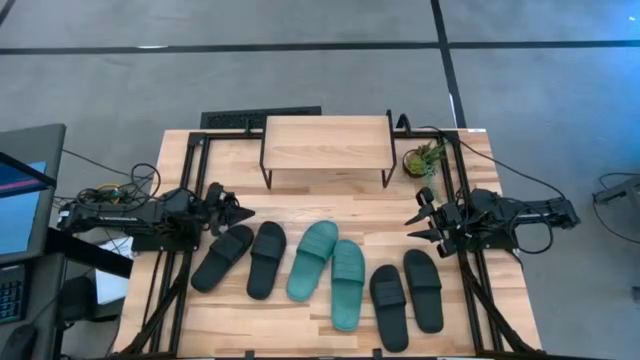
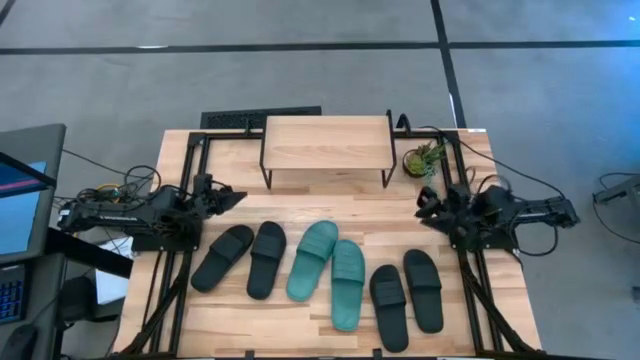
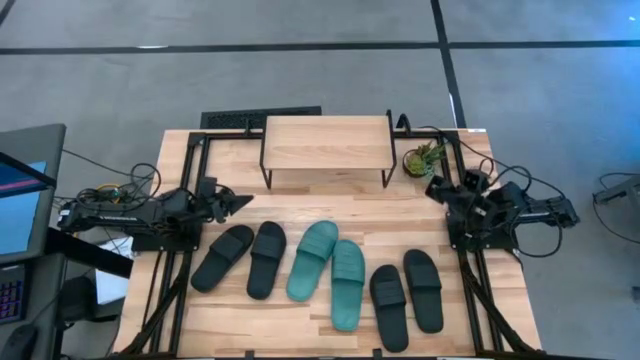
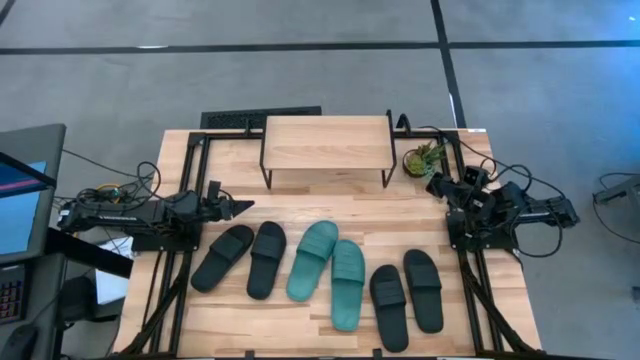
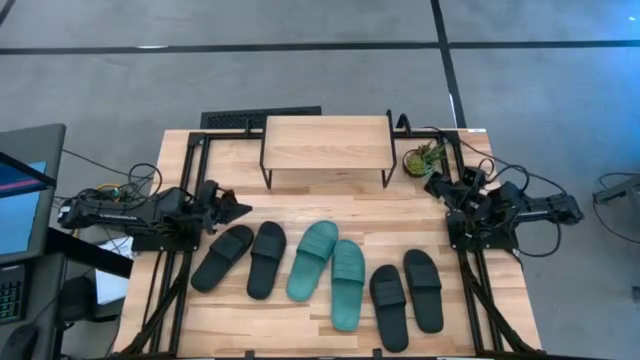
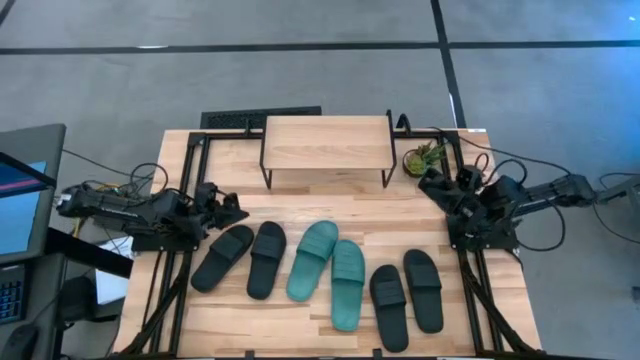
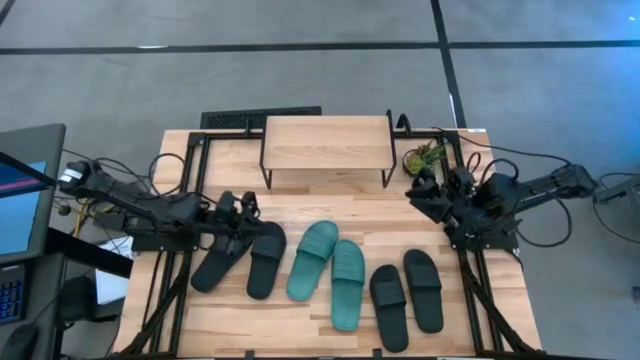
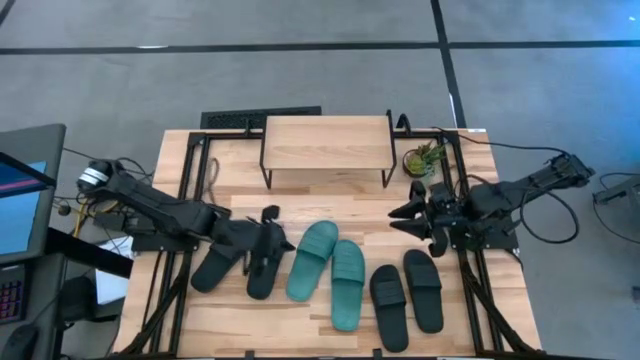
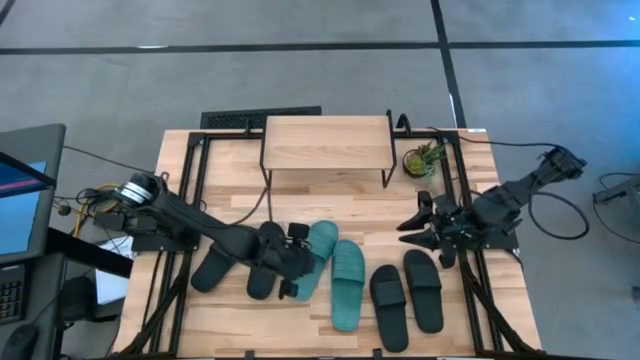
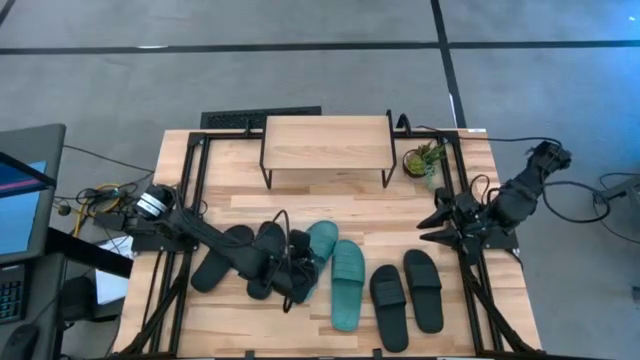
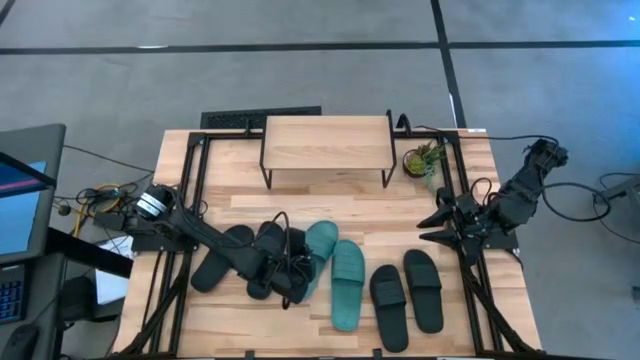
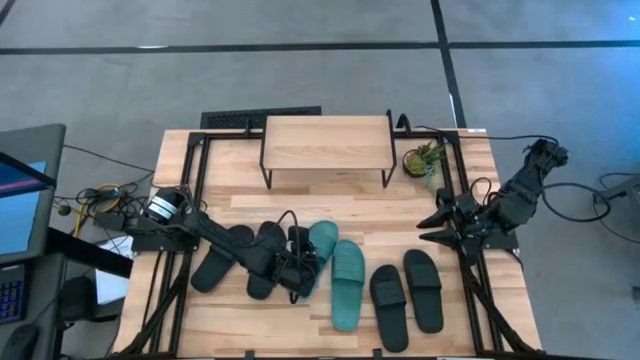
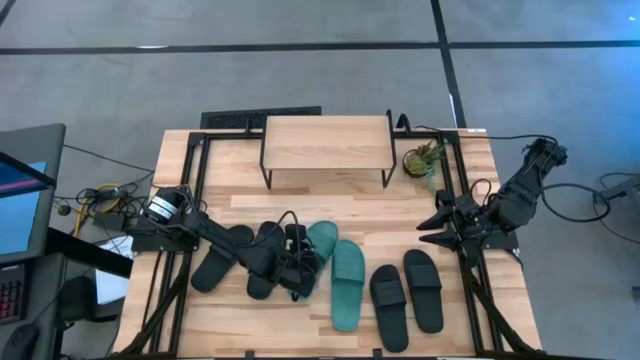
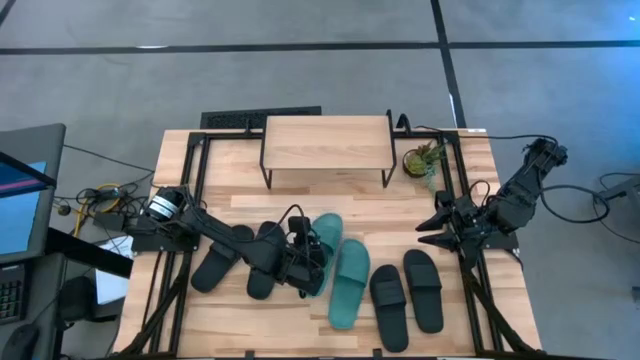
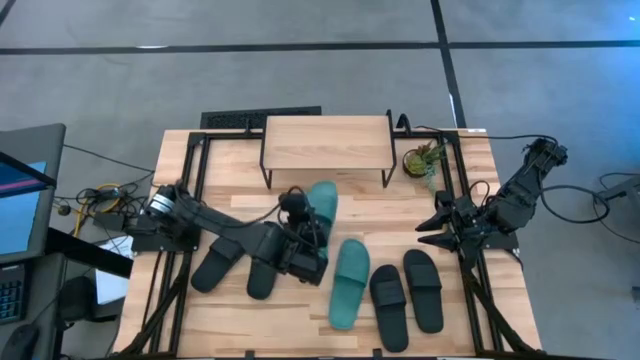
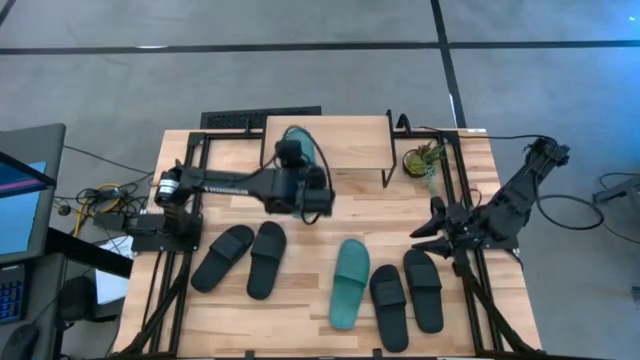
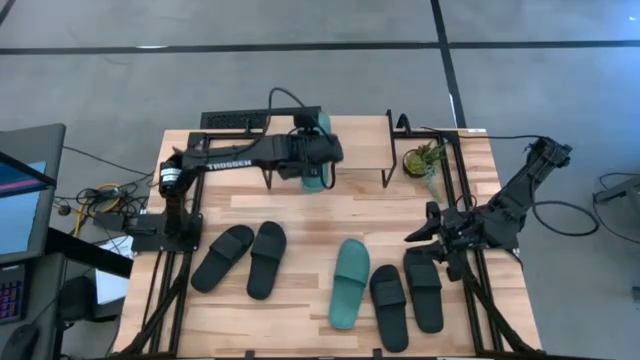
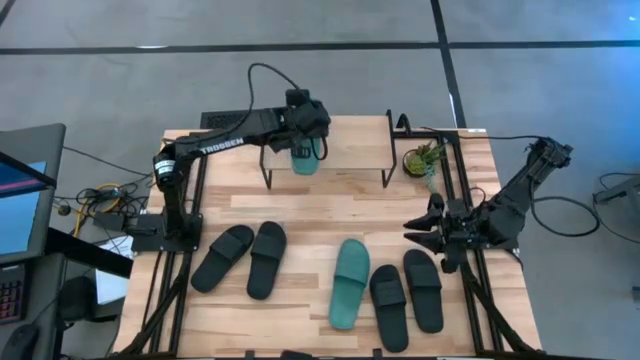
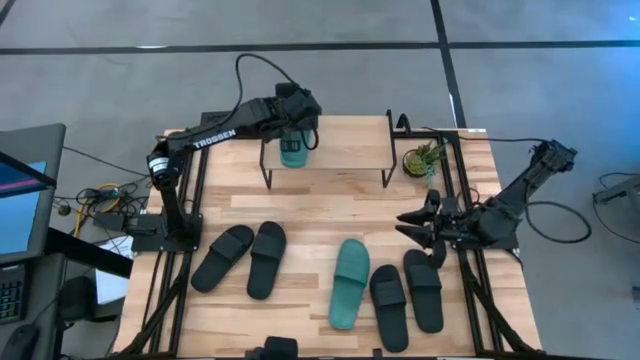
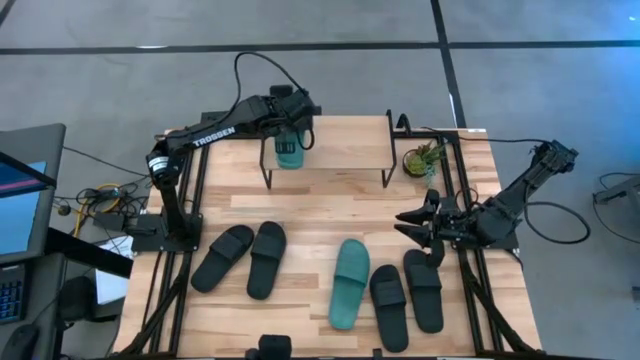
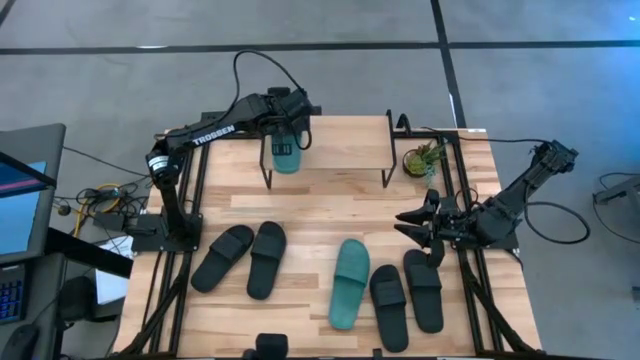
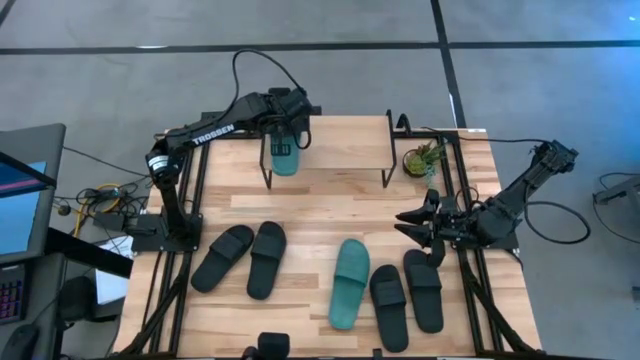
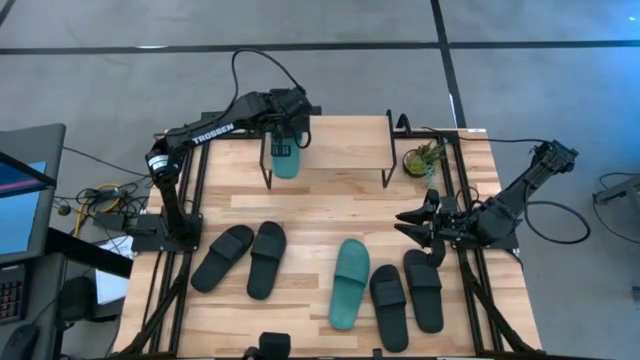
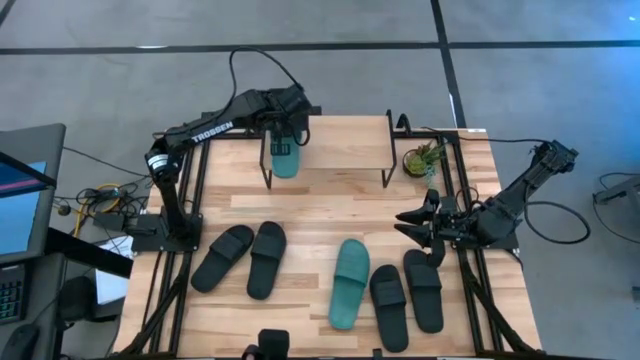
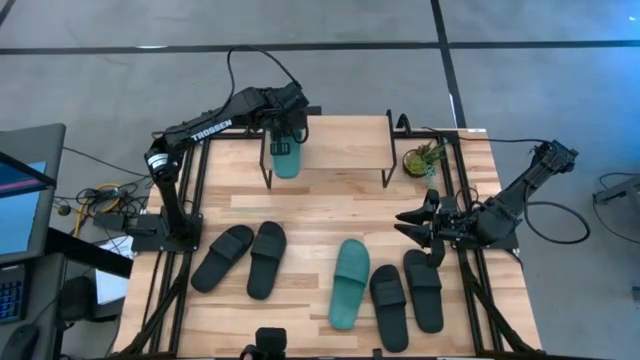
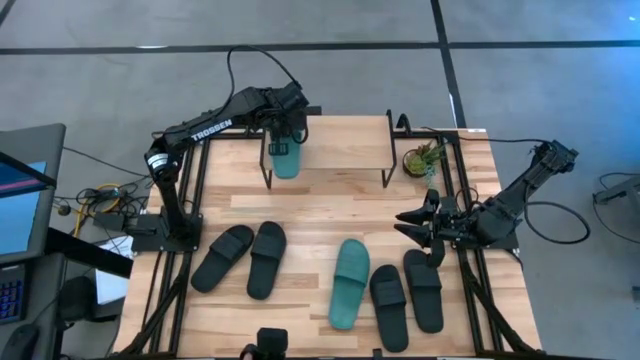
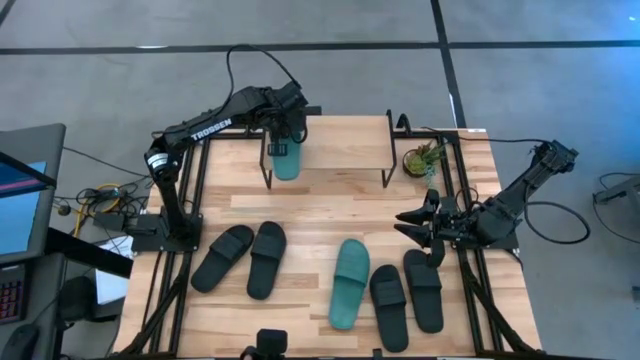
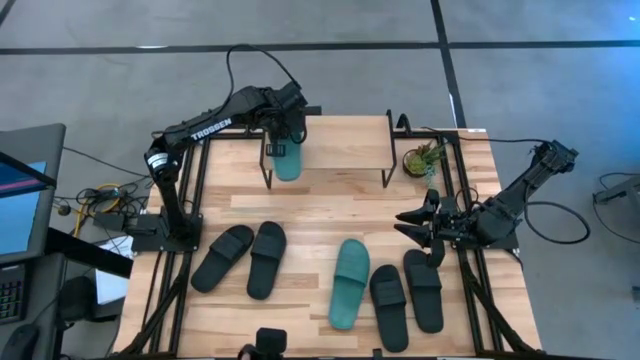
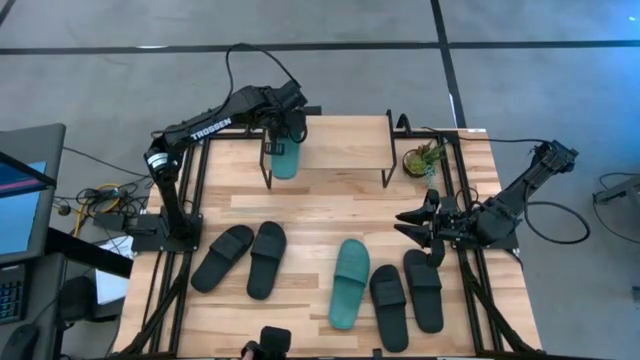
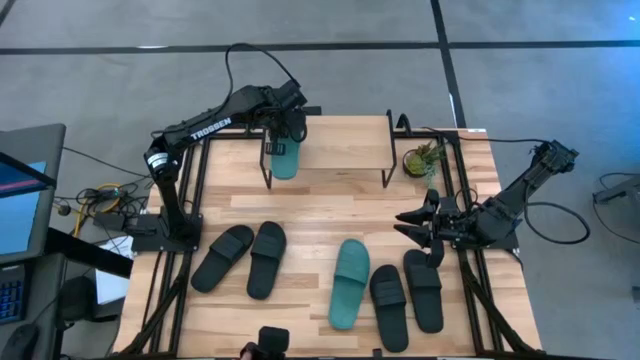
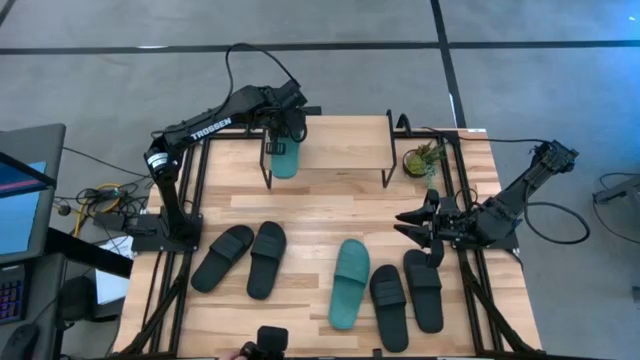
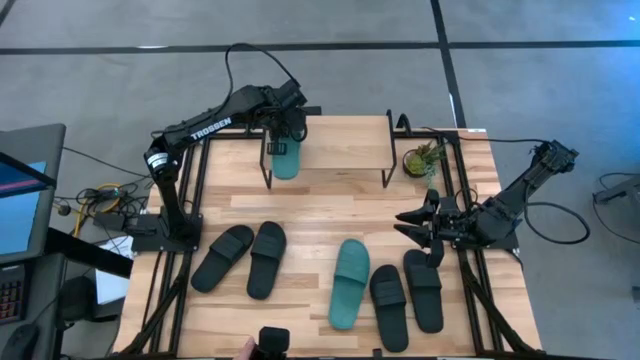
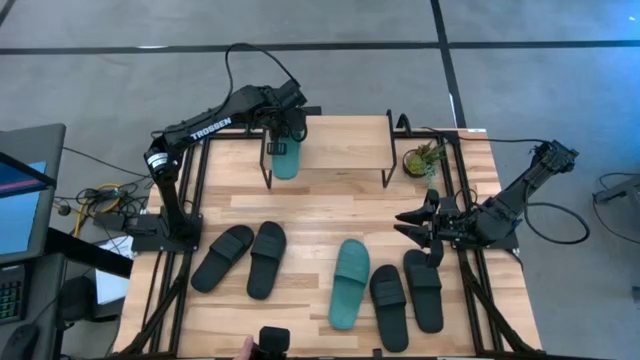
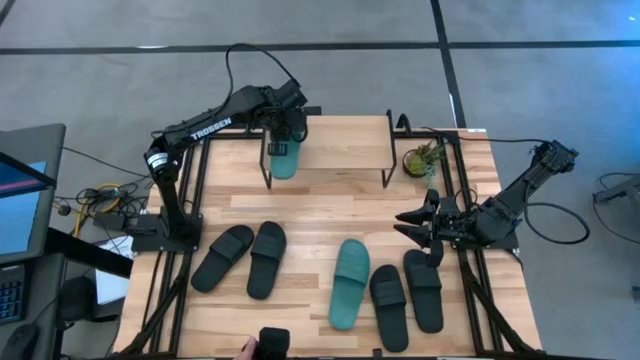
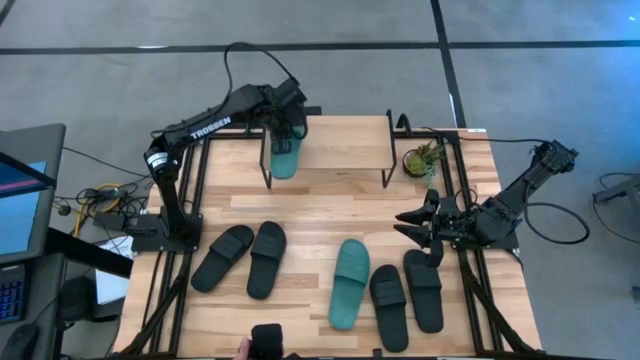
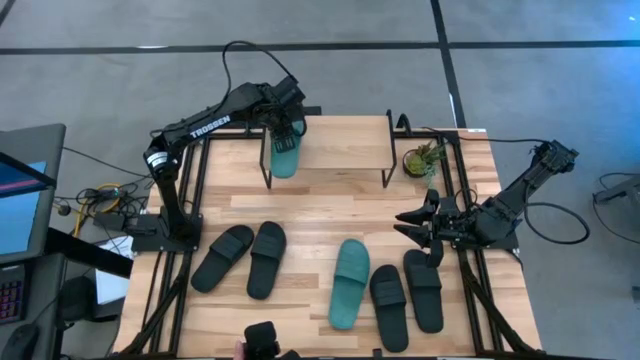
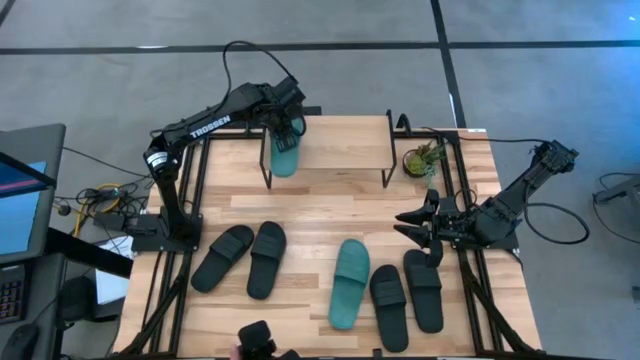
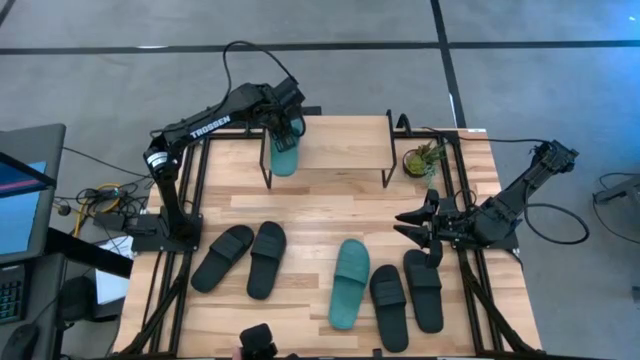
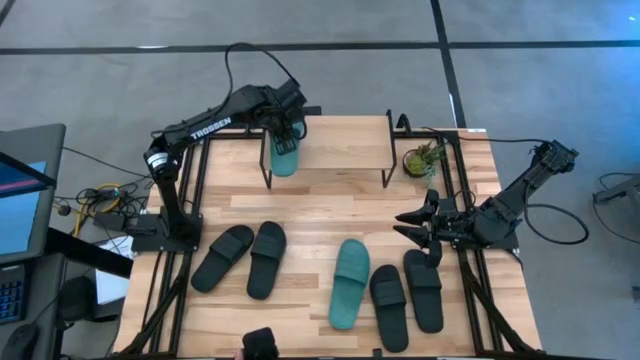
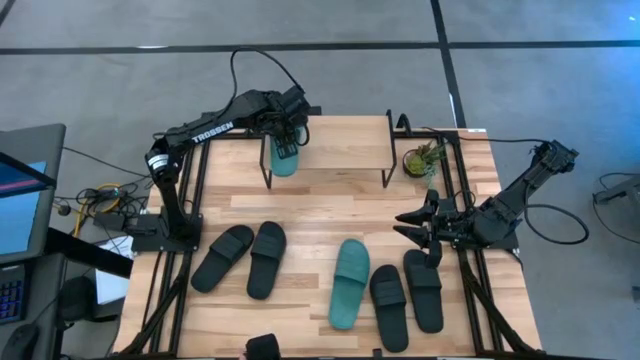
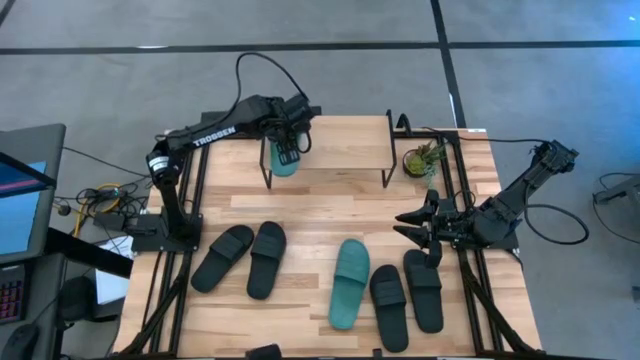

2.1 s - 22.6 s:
Task: Pick and place slides into the shelf
Put the left green slide on the shelf
